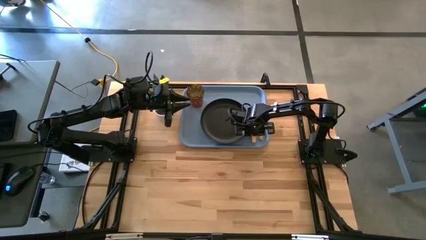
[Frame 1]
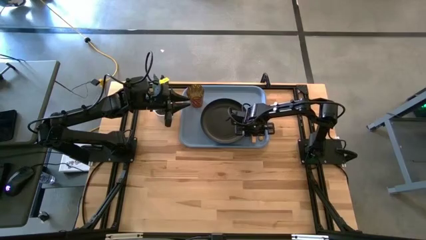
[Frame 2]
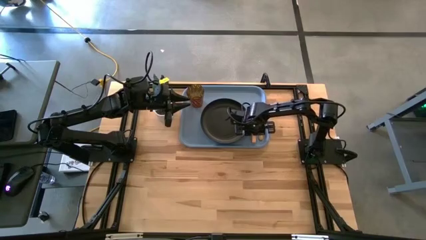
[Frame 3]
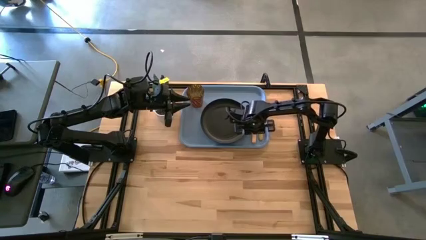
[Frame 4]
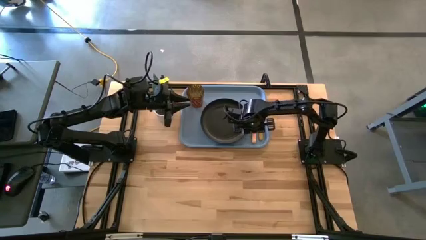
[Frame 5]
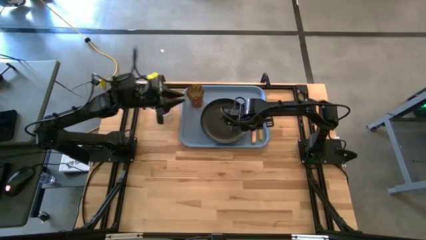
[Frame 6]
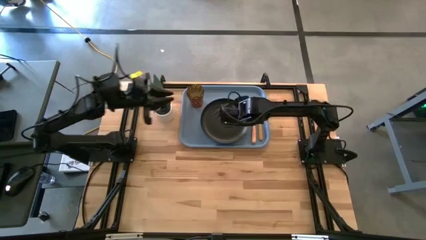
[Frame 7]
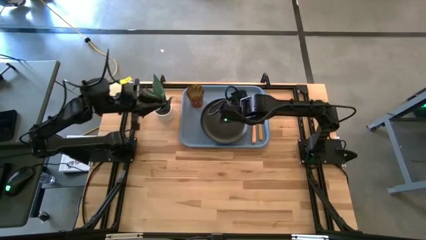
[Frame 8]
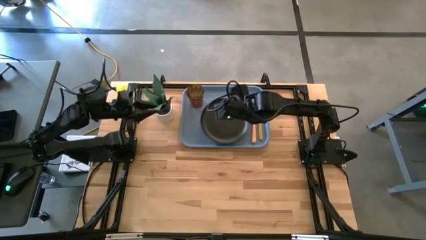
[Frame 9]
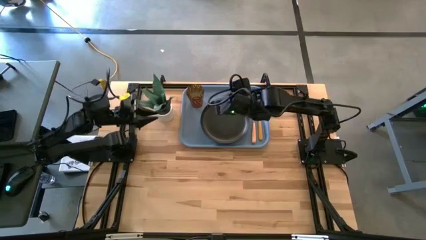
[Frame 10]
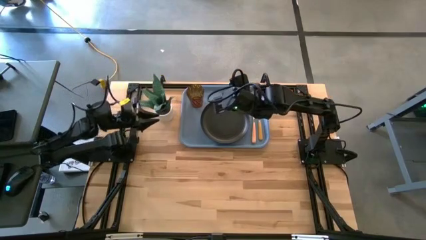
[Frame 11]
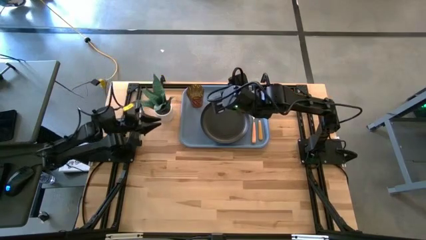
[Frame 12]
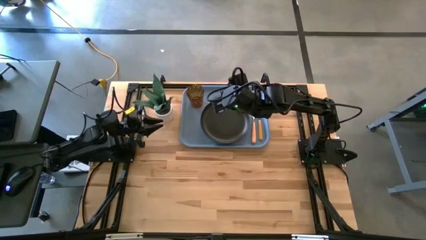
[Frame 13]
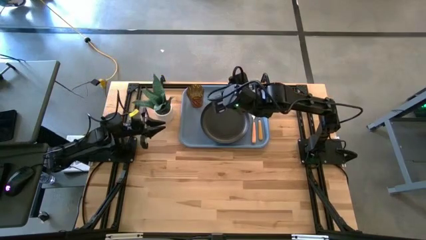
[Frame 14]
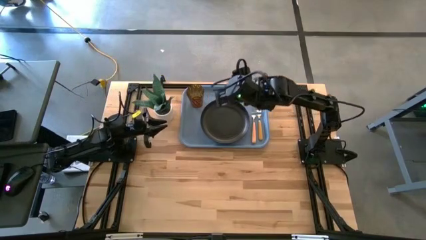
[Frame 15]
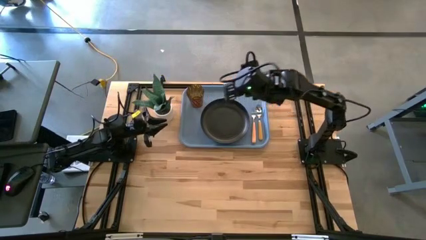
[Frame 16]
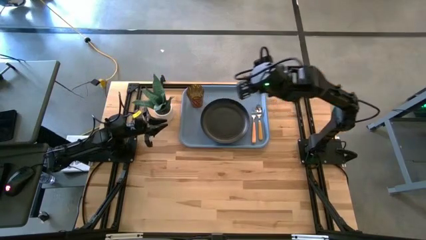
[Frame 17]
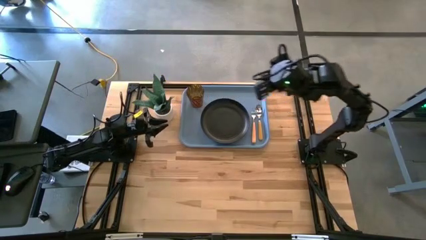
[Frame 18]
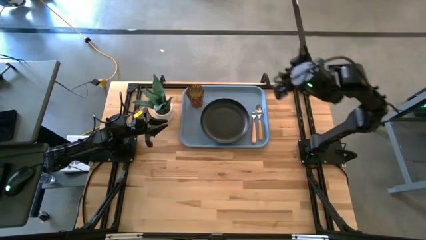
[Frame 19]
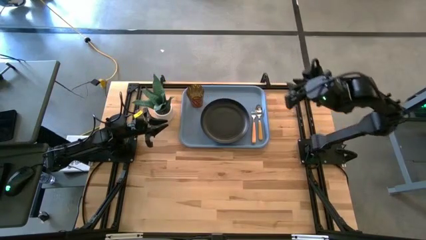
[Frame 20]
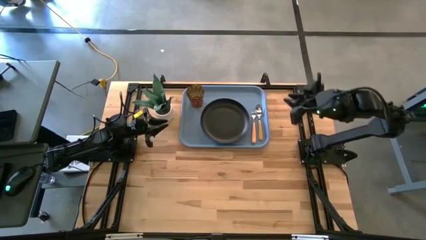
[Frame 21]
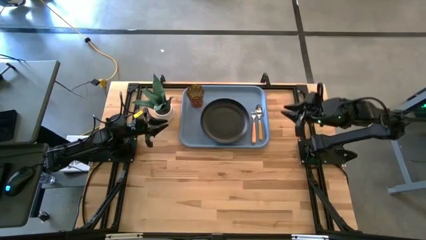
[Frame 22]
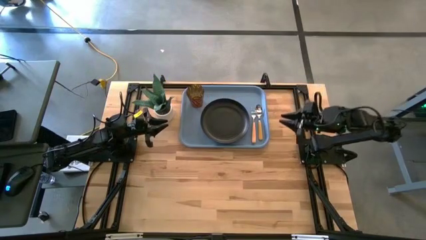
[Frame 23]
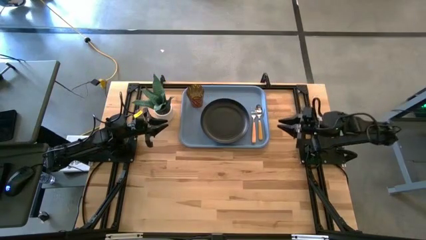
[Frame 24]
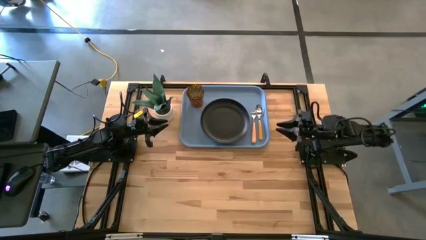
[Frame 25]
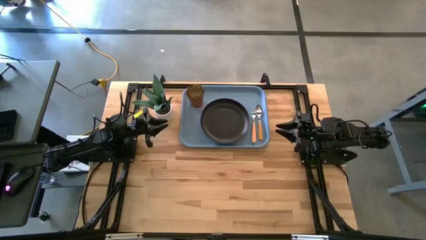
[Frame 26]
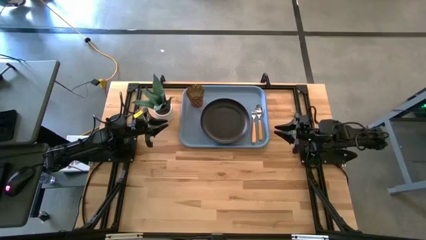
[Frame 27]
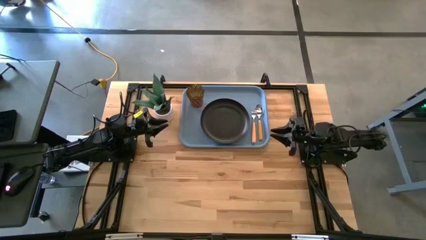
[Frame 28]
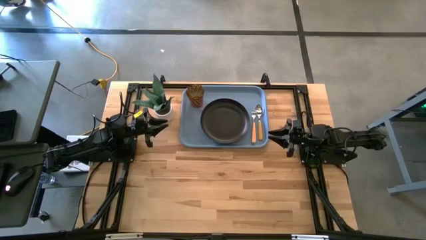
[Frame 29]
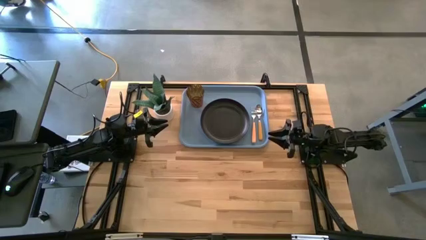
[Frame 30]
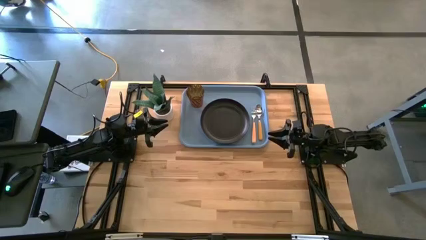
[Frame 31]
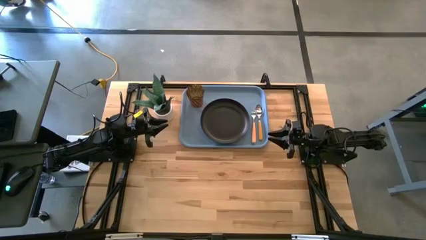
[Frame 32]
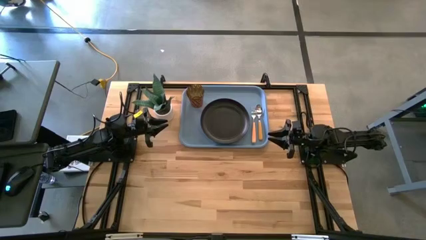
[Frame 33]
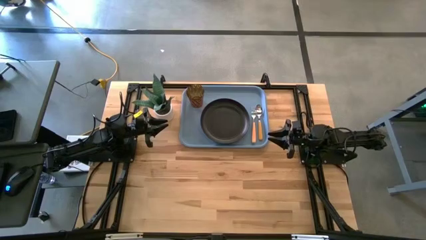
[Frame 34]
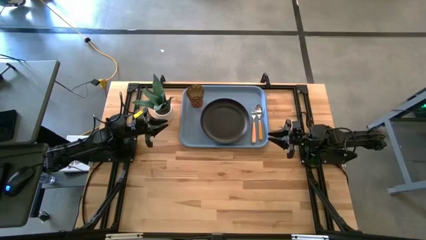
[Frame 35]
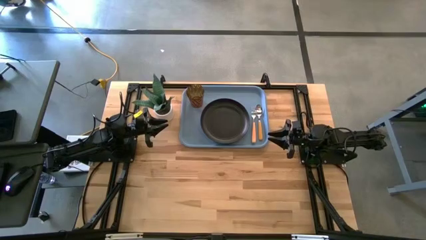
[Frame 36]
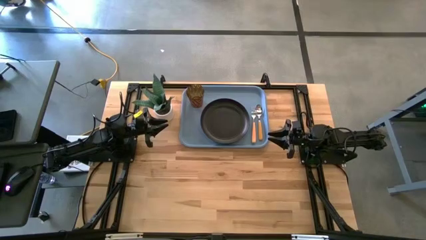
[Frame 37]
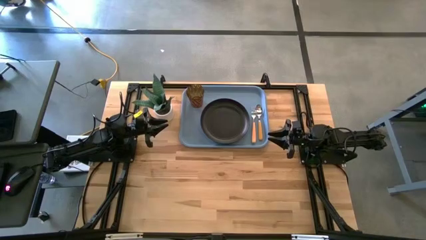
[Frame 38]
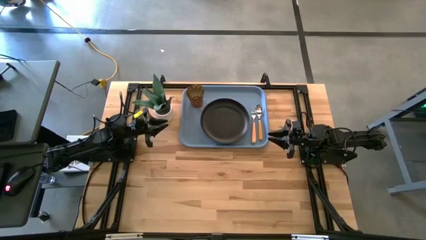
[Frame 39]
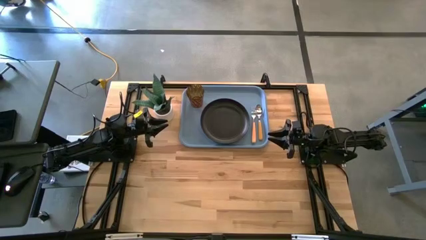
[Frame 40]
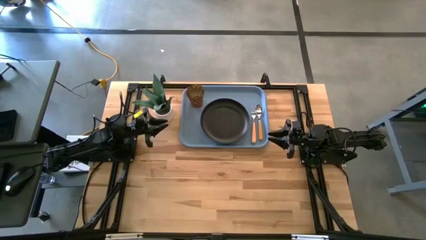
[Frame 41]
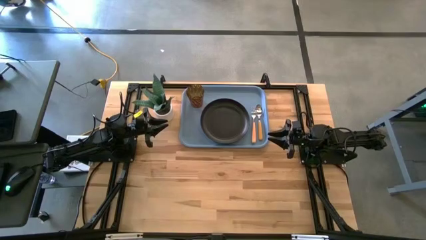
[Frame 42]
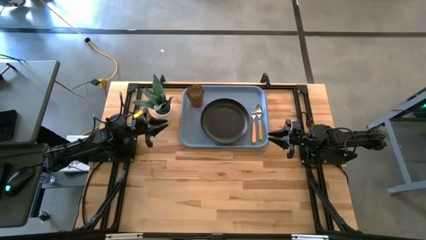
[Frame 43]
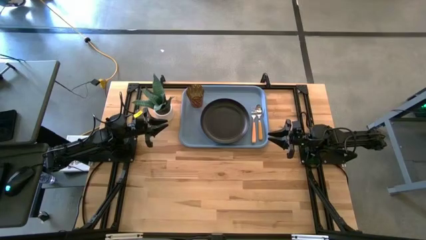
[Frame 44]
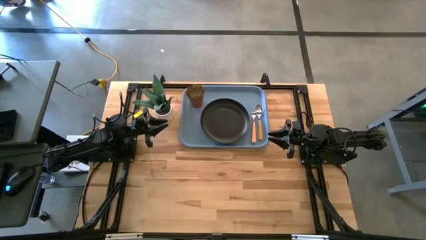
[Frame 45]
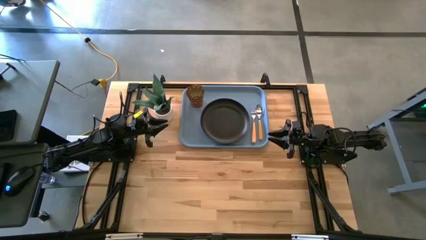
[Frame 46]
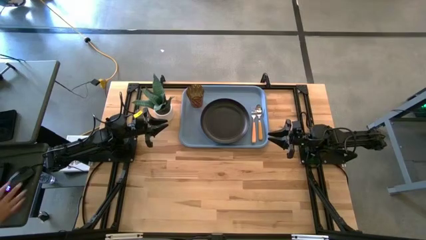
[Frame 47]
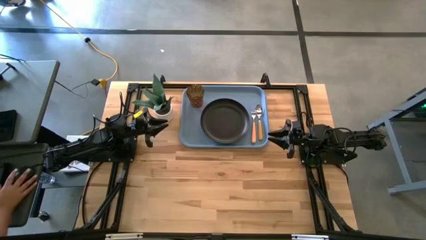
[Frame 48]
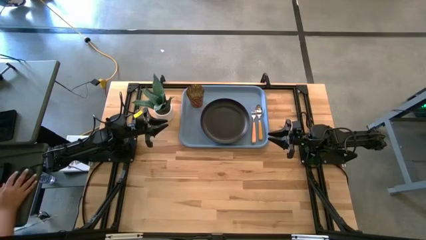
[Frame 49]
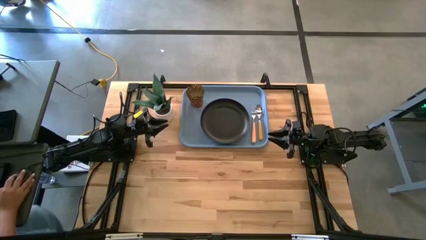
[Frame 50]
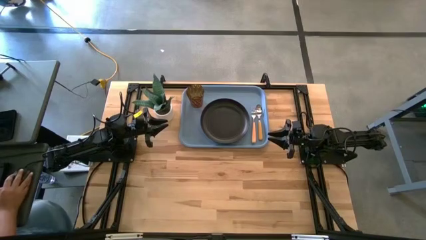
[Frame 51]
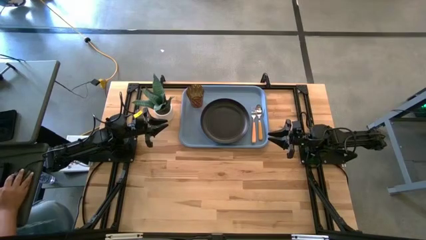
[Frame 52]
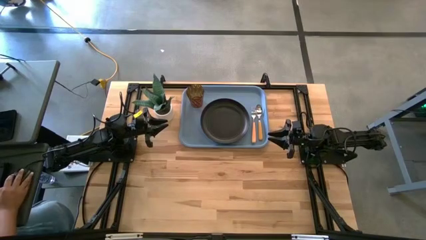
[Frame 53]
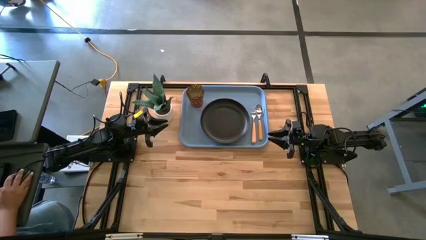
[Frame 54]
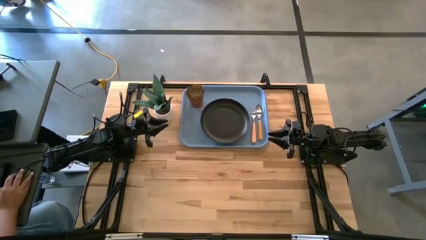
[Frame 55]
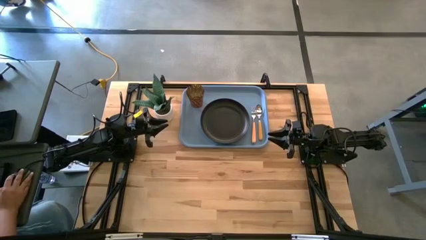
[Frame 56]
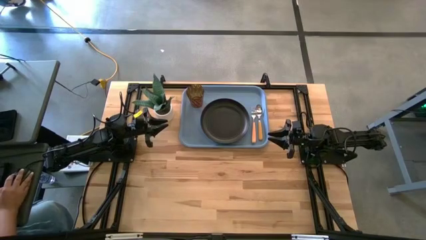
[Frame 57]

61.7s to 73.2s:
Task: Pick and place plate/cup/fork/spoon on tray
Return to Home Position
